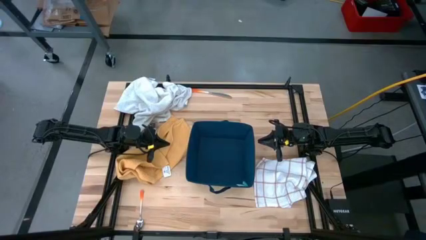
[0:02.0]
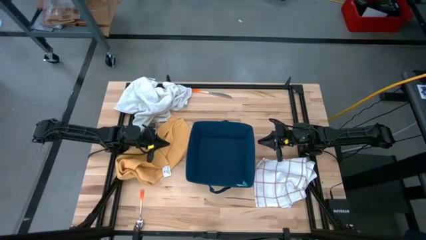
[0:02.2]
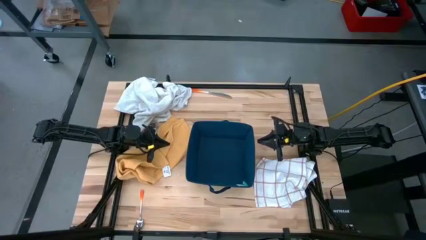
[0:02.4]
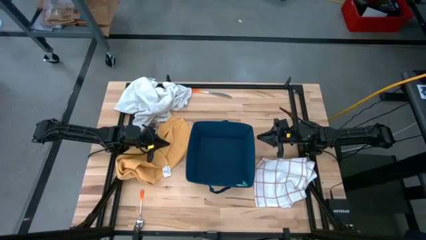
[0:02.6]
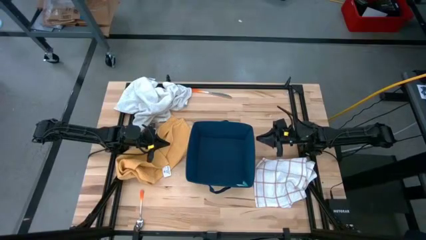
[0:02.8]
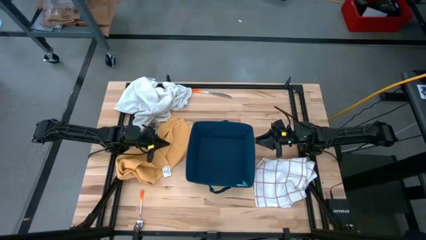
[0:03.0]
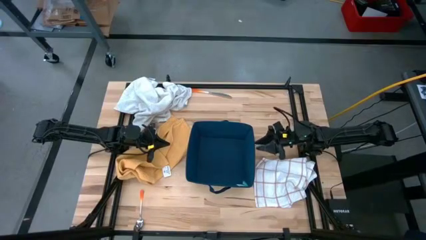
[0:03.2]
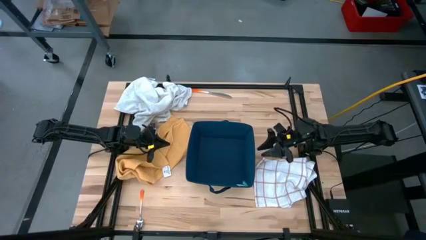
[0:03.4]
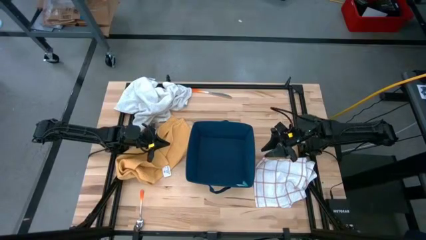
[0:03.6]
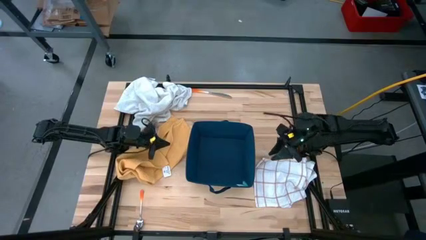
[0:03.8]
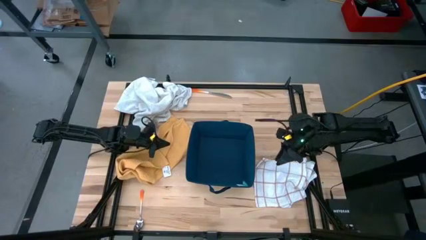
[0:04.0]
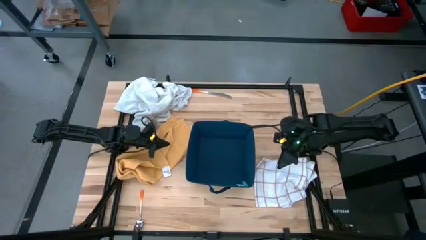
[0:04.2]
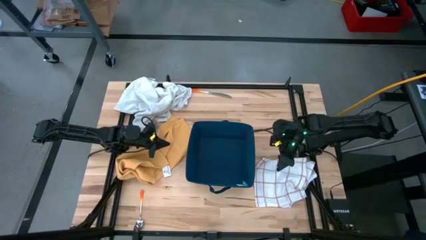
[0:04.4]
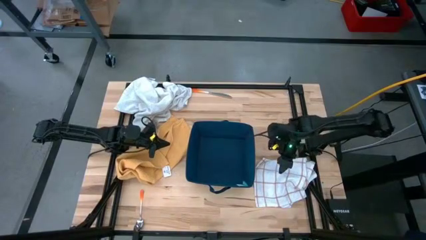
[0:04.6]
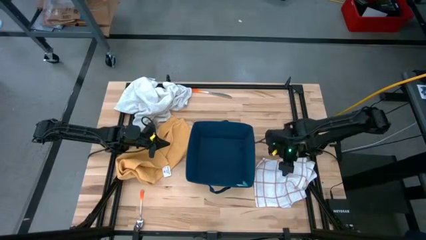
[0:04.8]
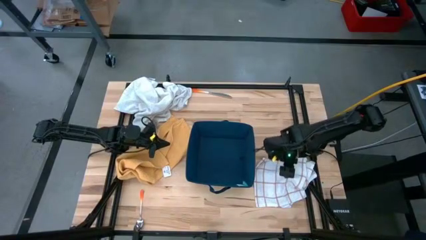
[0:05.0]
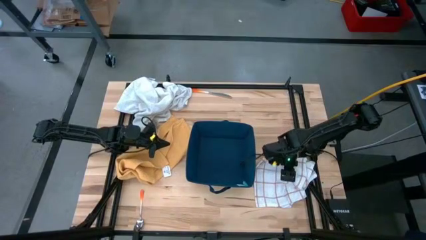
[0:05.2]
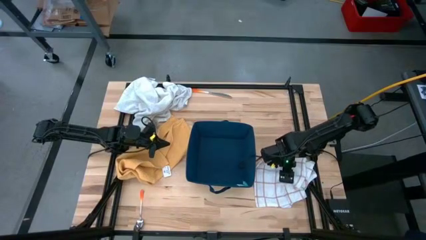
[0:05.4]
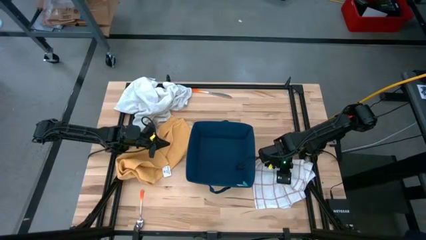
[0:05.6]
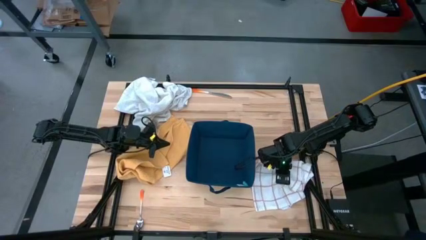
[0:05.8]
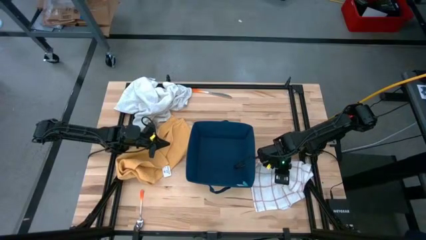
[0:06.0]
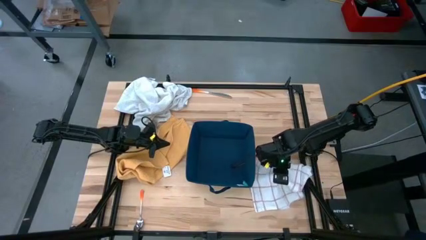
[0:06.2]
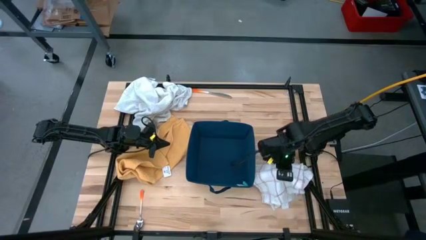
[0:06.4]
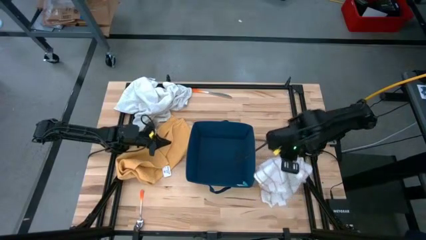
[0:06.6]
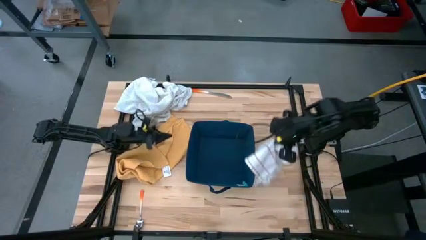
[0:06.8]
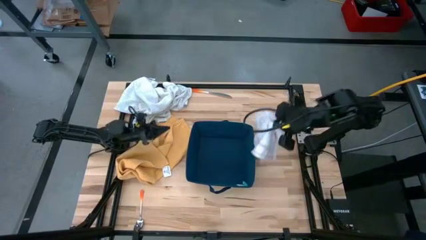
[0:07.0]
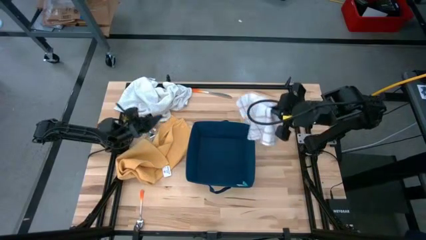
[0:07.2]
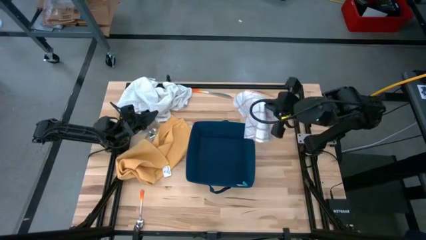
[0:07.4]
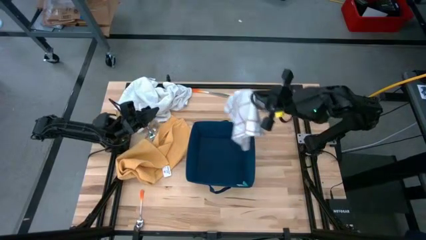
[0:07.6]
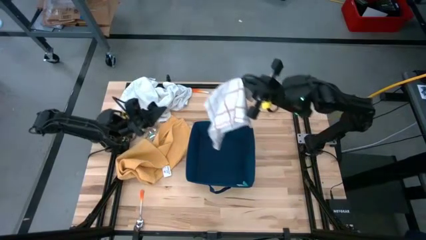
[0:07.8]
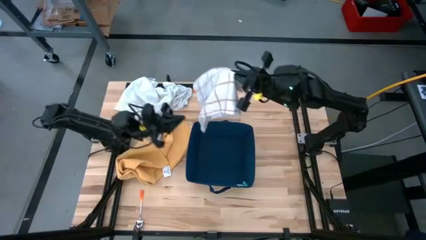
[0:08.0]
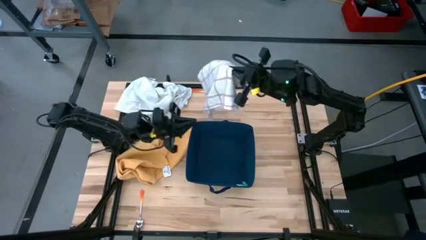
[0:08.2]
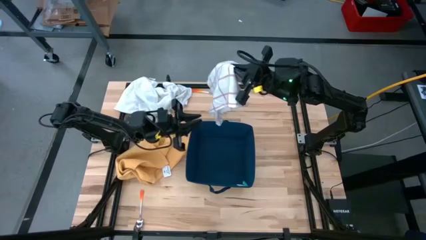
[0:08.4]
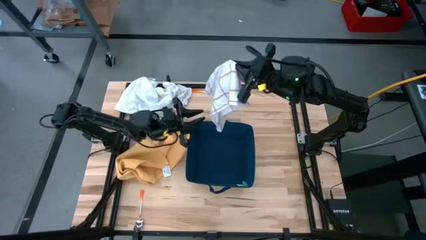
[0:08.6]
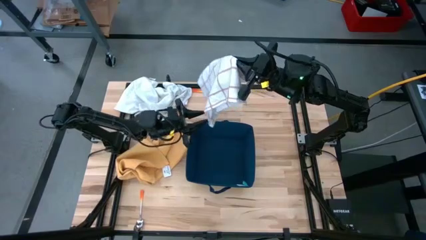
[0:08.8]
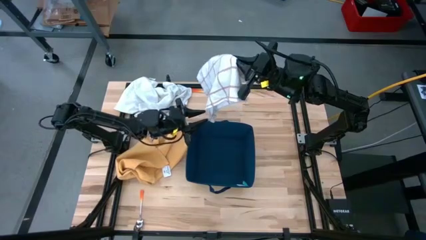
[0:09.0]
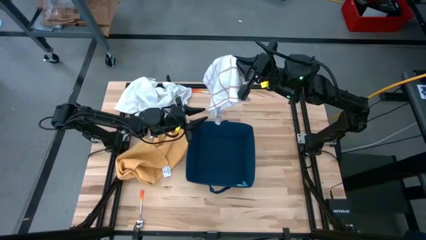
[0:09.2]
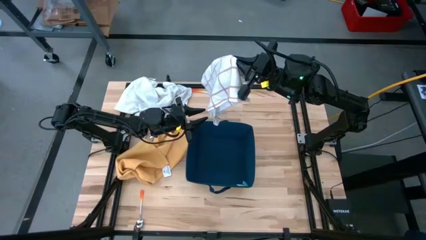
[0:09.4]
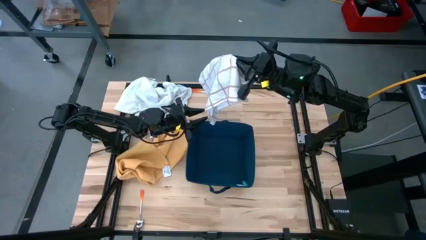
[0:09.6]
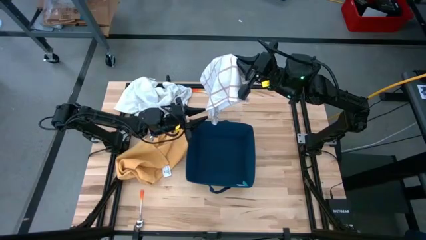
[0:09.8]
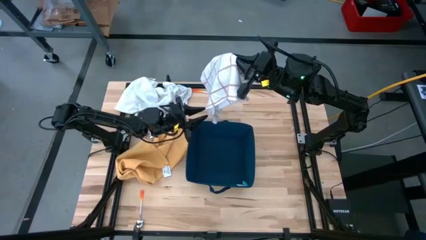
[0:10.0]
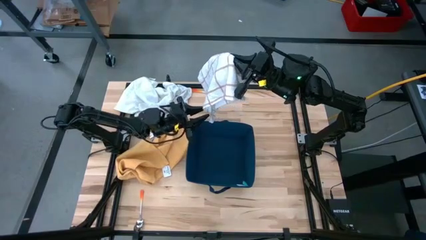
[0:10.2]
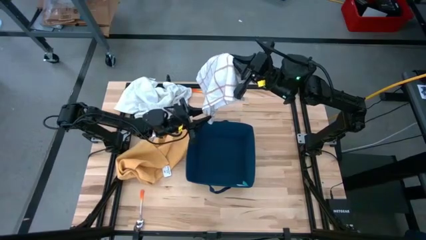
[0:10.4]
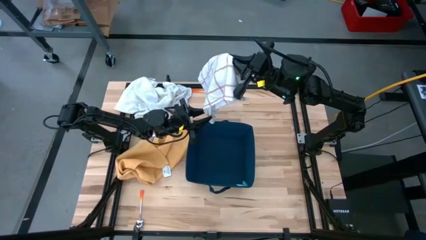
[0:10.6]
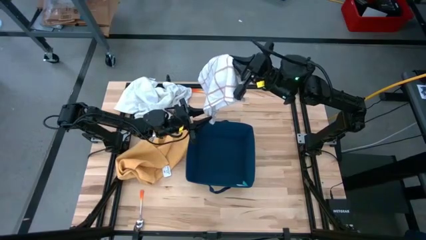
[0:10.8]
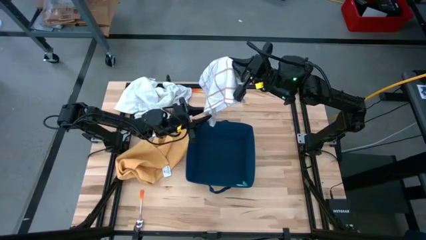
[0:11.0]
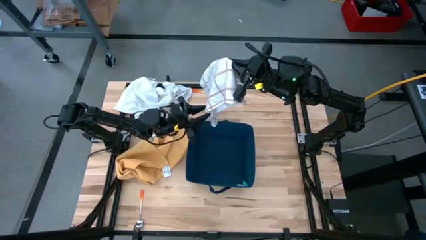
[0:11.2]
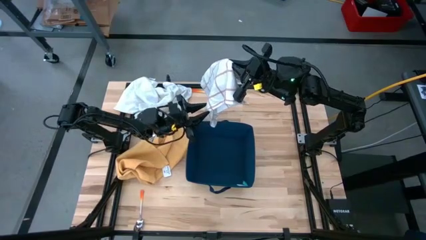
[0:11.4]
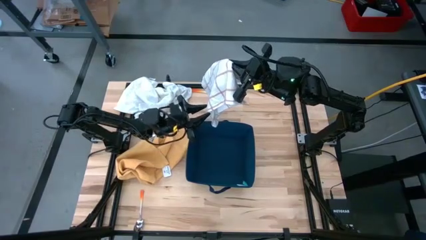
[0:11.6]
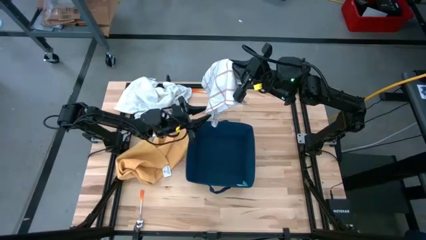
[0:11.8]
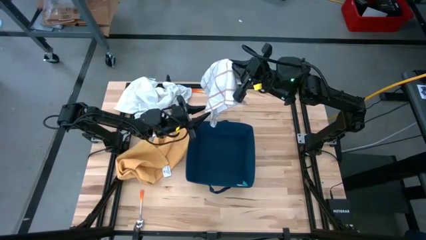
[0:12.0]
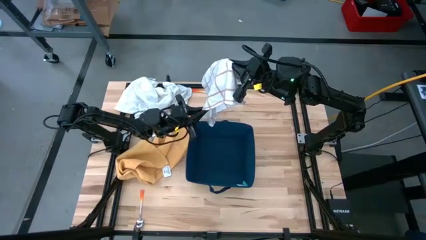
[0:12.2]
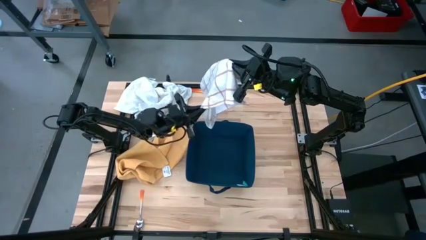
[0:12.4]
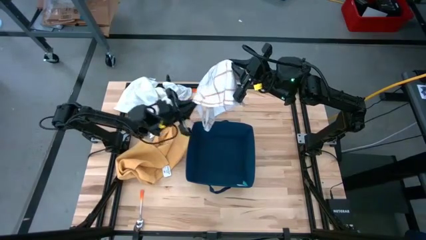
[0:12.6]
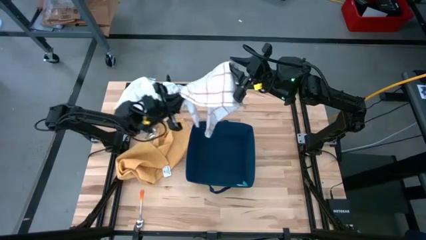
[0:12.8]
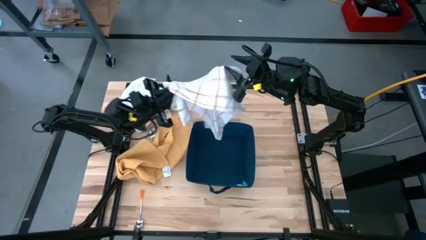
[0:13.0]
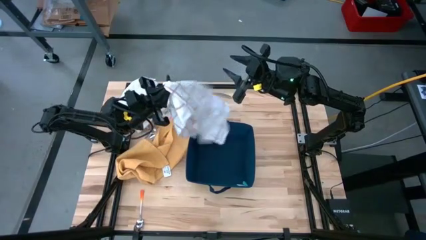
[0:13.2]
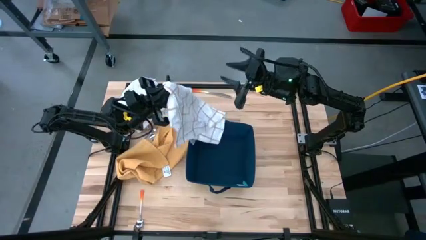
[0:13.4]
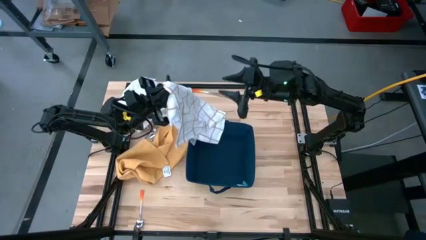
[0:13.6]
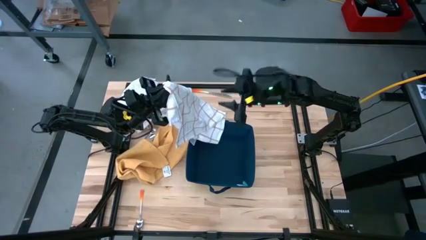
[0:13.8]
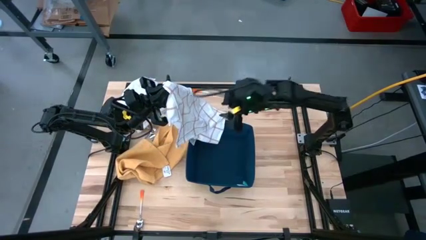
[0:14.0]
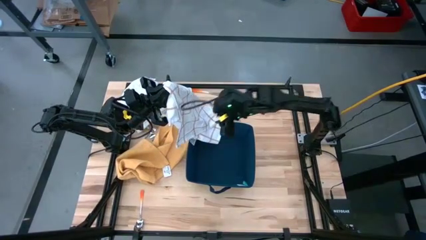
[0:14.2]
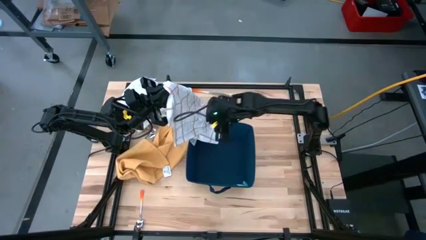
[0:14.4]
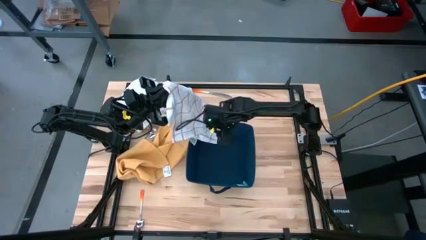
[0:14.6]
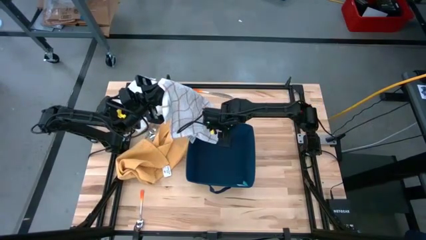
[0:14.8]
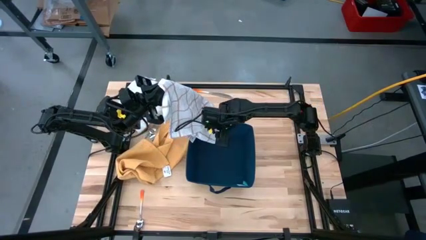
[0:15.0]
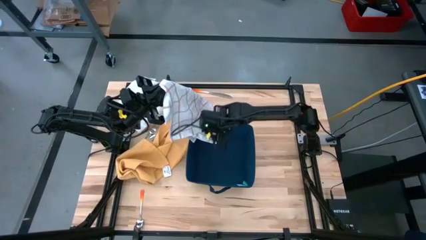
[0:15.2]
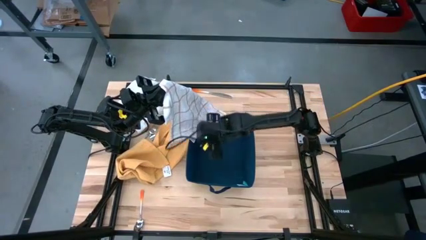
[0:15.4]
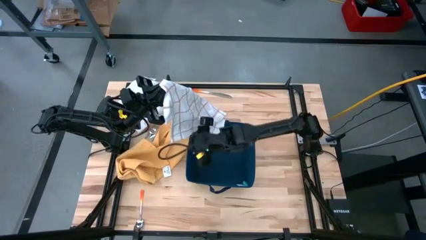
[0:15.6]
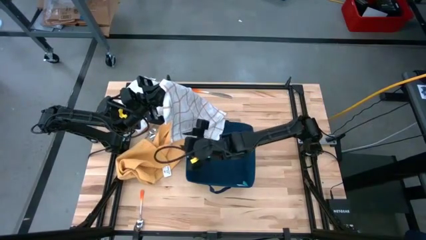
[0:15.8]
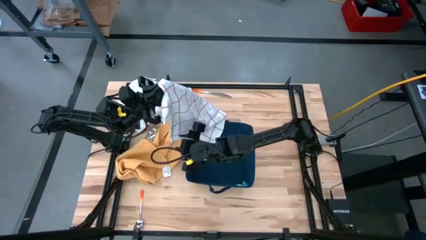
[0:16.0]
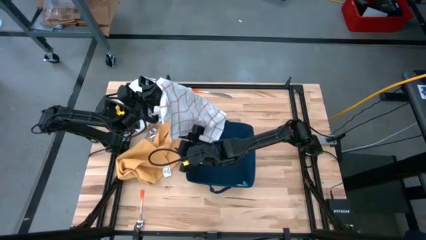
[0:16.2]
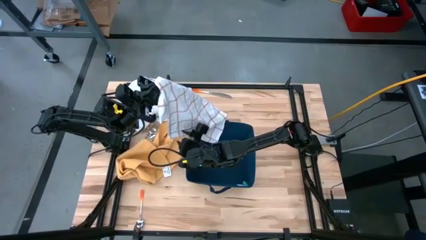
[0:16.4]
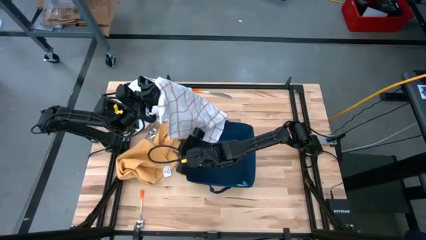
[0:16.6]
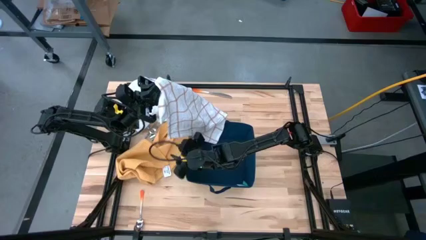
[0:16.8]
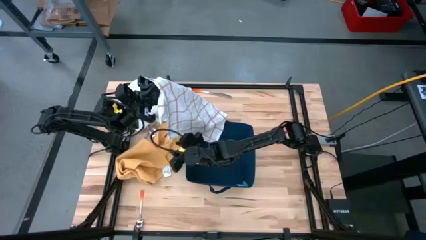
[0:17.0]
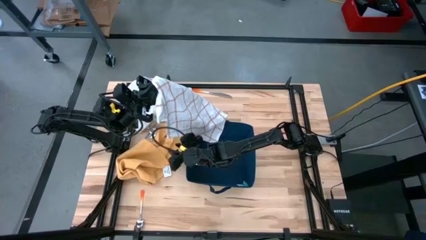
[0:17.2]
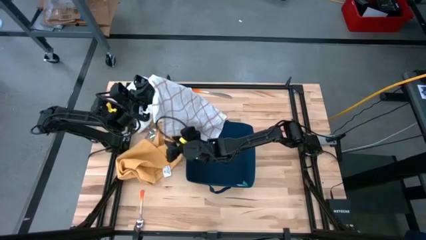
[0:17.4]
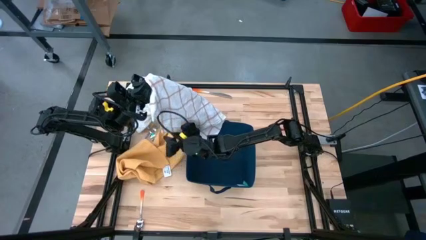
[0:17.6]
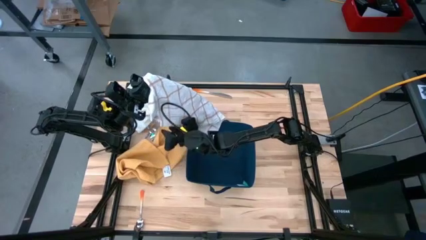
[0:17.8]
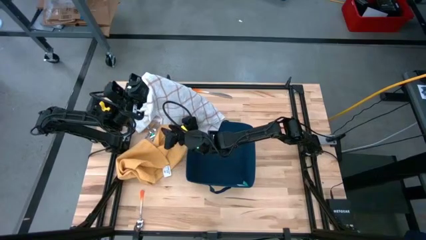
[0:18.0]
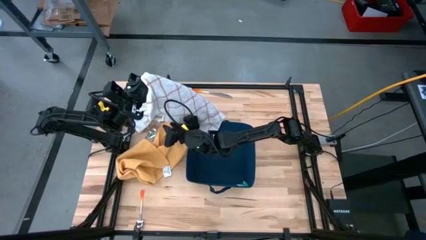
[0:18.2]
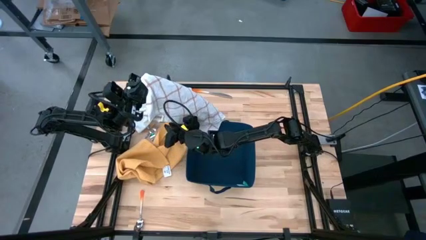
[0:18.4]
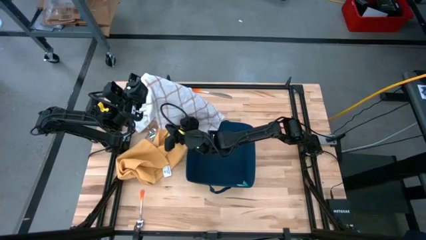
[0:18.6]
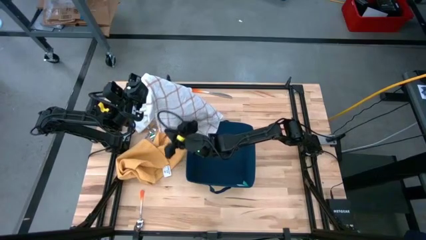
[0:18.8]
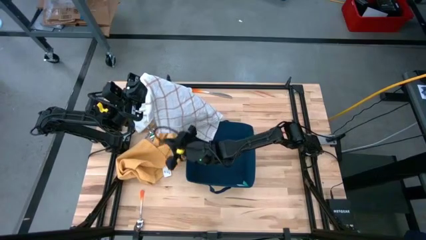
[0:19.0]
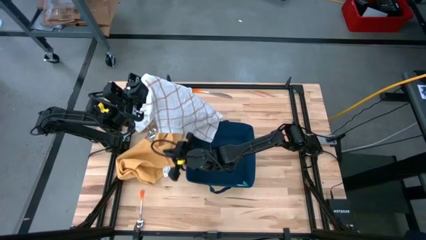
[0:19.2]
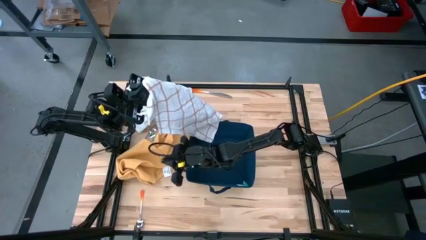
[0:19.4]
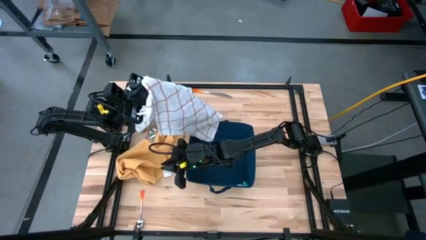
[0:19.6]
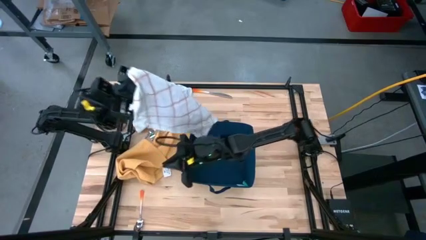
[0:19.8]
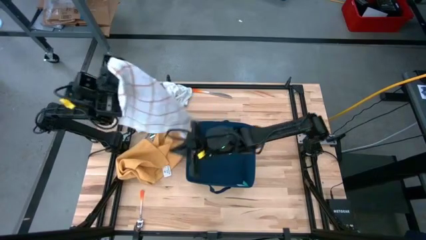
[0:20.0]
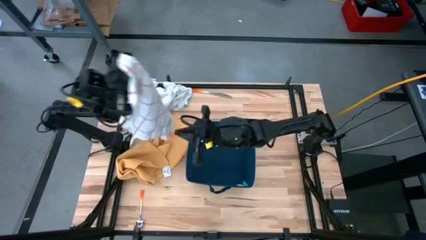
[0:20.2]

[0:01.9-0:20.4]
Task: Fold towel
Fold the white-and-brown checkered towel
